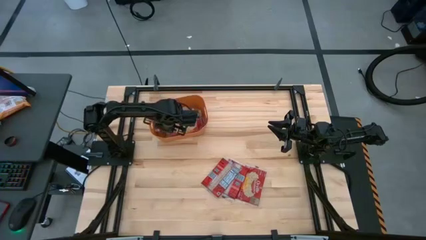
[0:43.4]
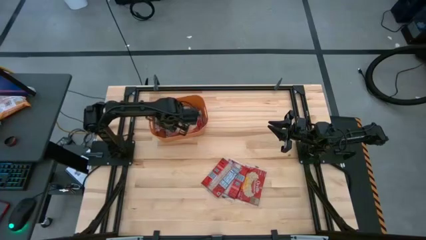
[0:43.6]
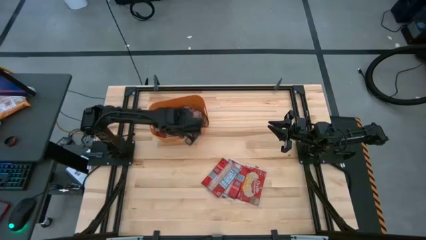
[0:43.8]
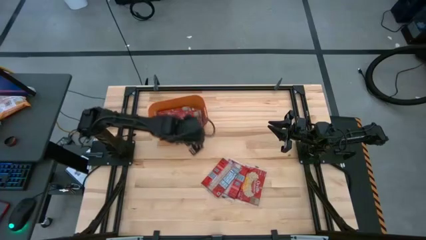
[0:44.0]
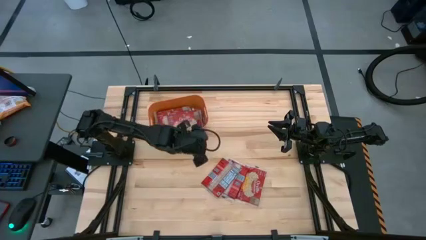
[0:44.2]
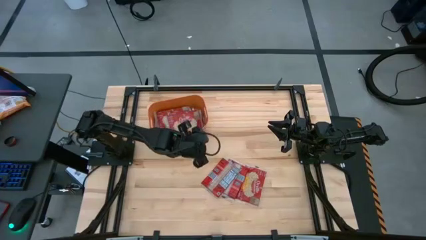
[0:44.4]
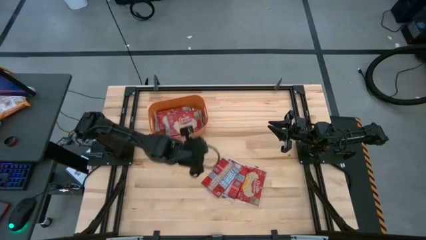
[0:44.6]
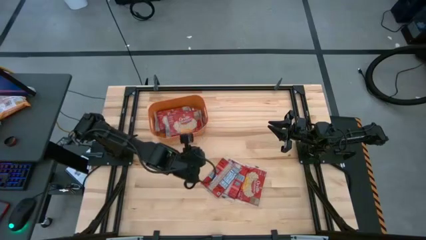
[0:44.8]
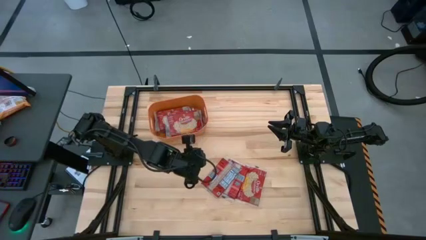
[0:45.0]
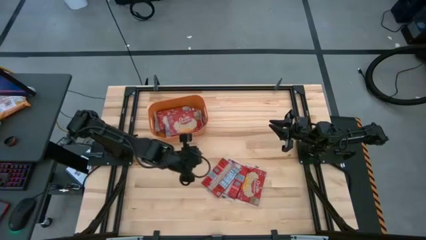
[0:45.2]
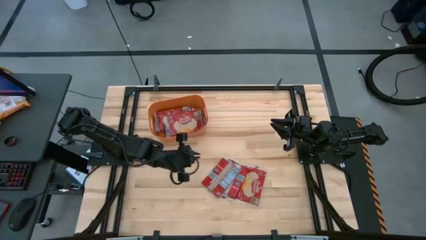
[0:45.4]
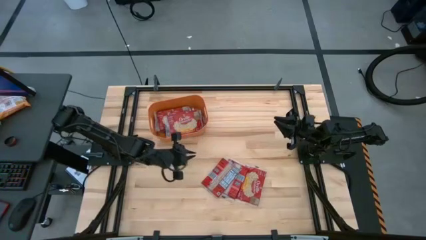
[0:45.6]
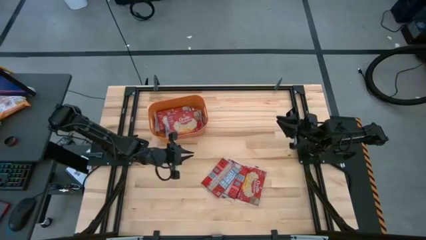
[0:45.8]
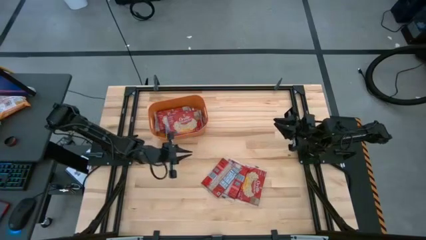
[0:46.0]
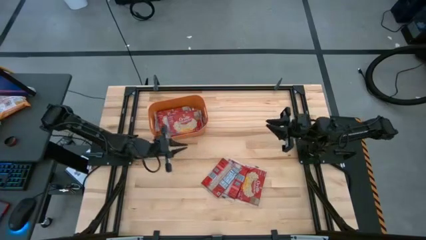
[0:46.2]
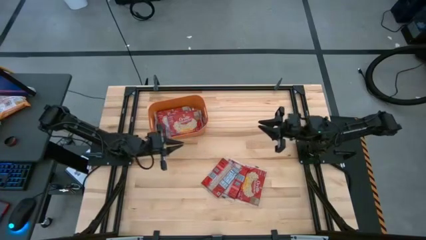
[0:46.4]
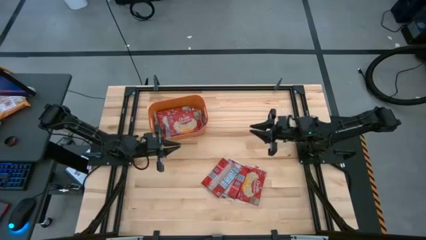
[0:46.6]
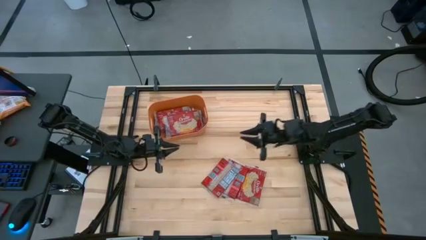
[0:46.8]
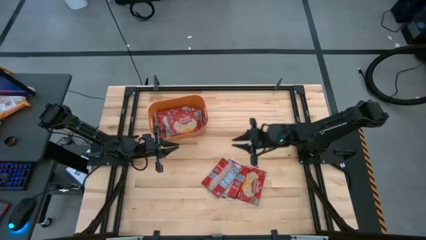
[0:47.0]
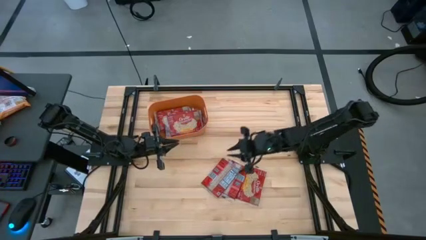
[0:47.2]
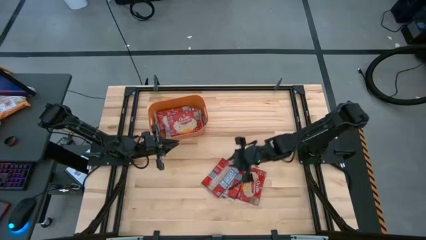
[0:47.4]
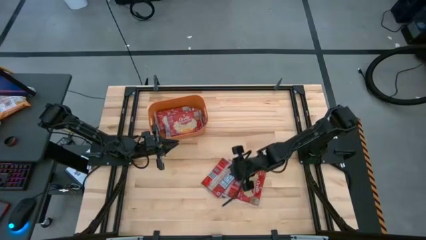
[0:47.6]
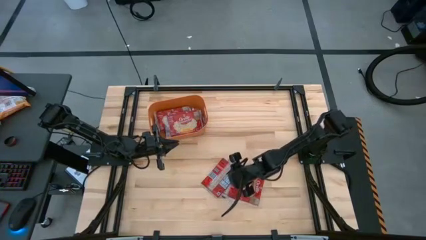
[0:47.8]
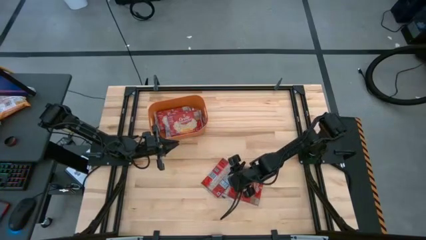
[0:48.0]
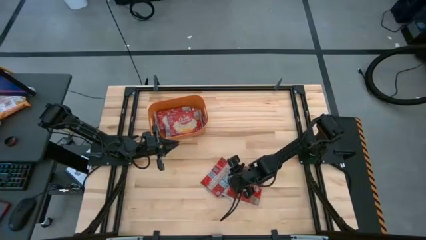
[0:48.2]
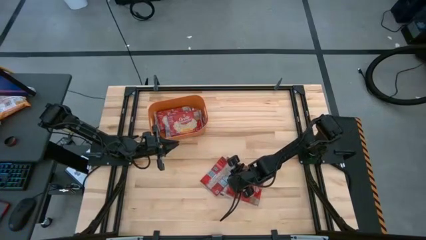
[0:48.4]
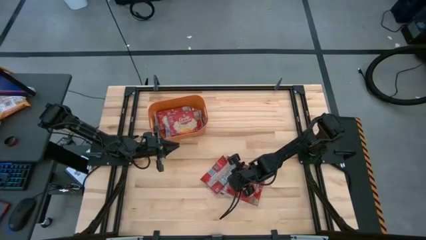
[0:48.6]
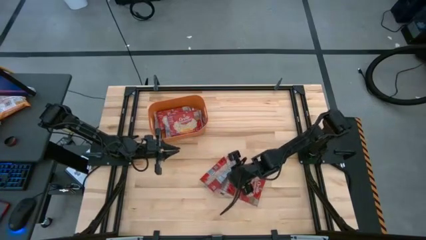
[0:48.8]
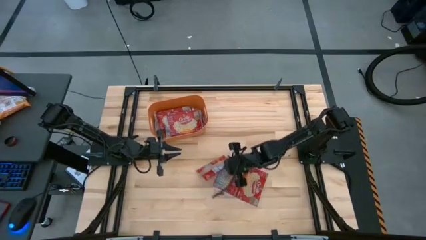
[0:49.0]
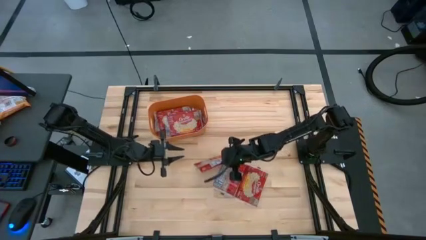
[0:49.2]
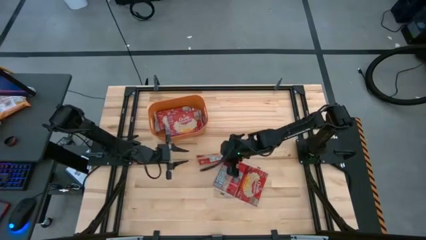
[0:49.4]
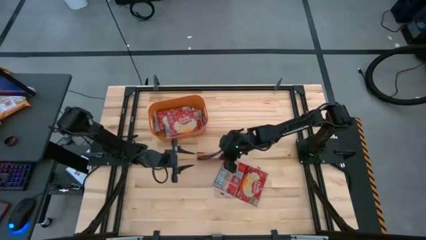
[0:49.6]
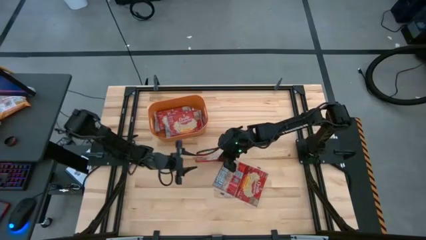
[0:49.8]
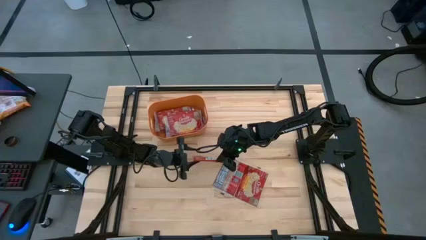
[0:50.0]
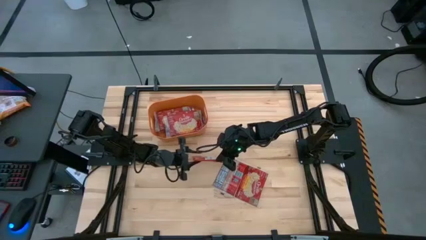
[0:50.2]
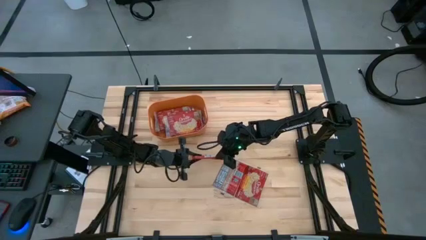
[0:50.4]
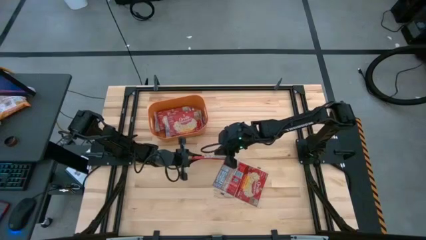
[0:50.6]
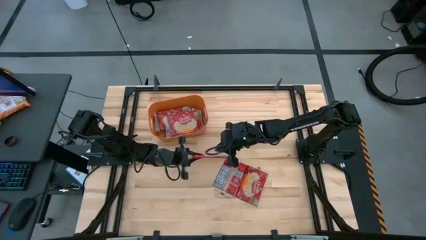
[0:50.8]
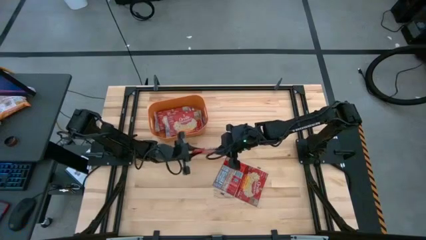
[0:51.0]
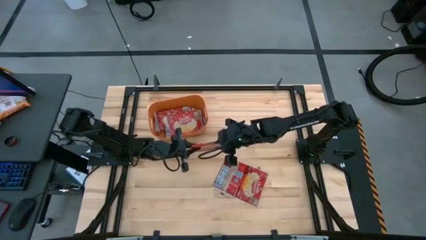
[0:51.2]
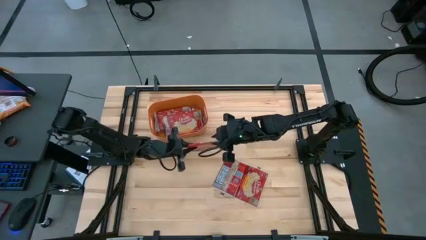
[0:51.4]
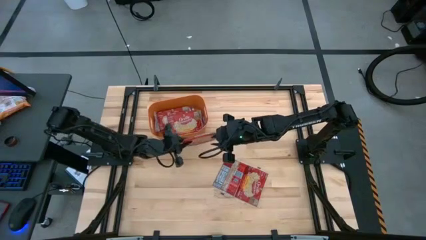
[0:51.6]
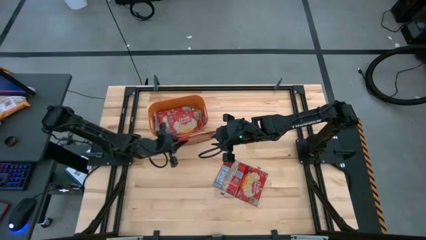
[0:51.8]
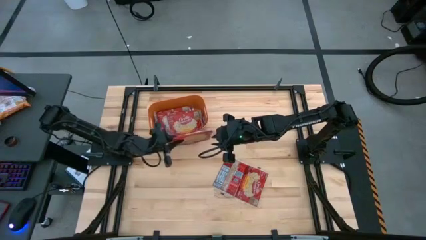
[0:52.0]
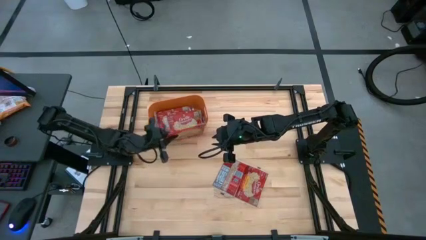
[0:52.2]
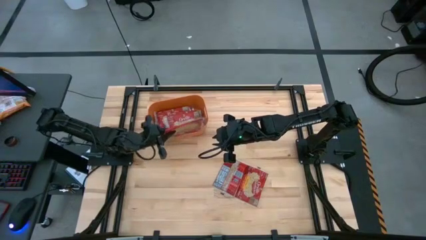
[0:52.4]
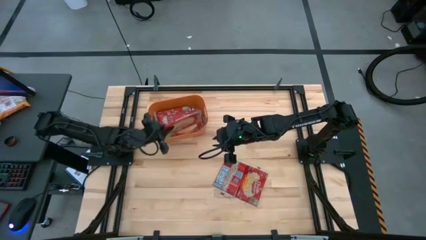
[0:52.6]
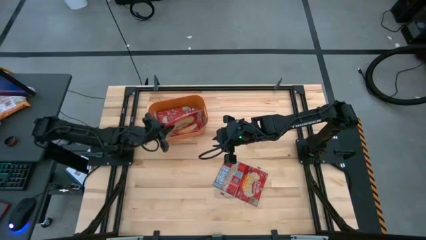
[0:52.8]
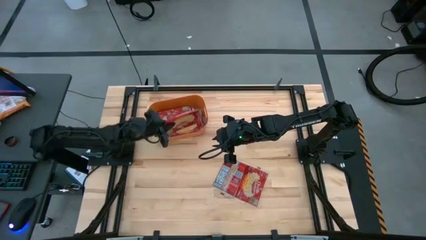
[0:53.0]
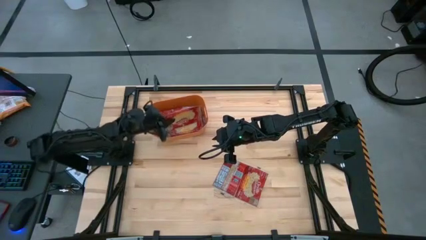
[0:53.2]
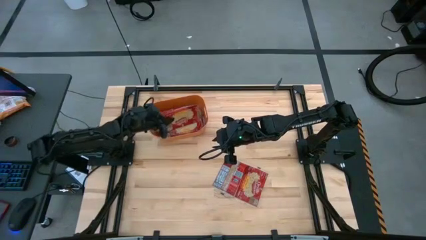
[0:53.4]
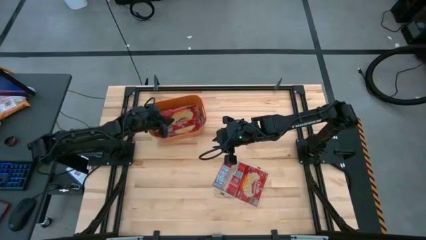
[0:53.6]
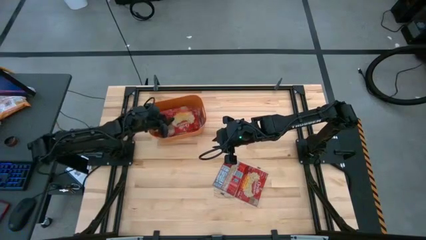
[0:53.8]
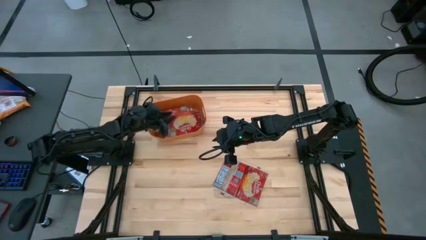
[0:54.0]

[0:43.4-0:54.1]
Task: Sort popcorn bags into baskets
Put the red popcorn bag into the orange container

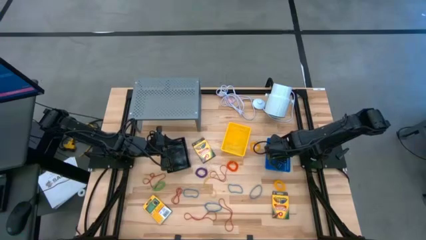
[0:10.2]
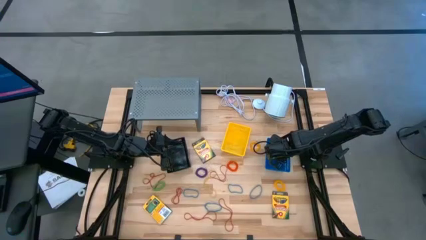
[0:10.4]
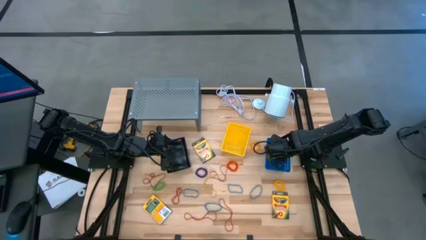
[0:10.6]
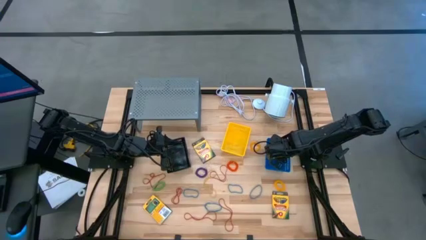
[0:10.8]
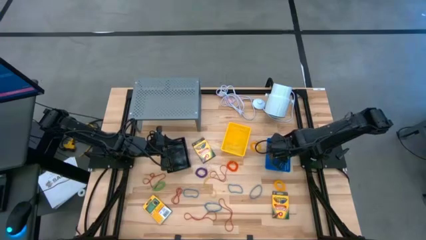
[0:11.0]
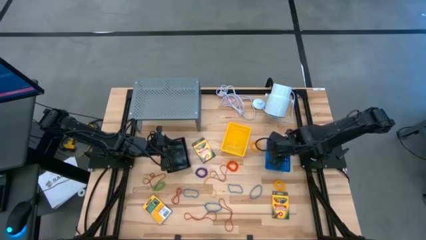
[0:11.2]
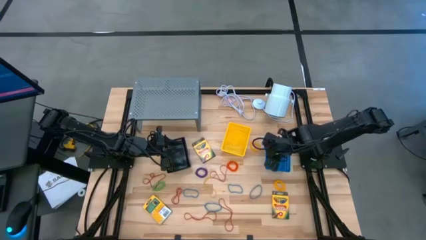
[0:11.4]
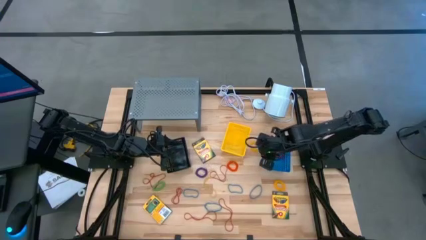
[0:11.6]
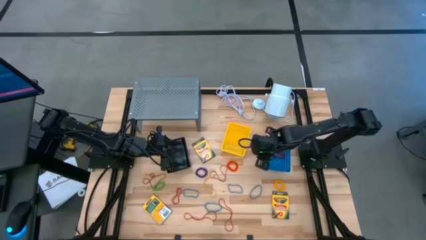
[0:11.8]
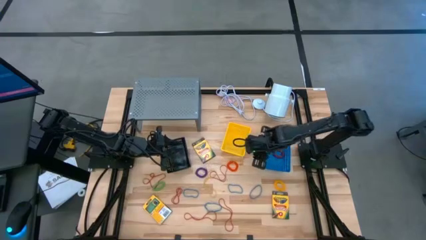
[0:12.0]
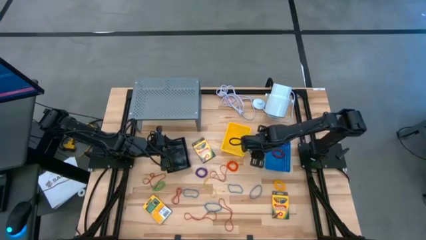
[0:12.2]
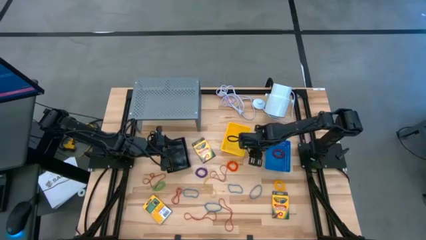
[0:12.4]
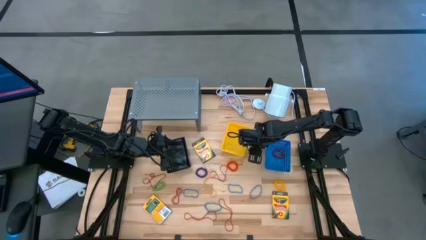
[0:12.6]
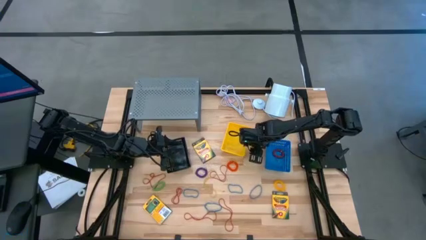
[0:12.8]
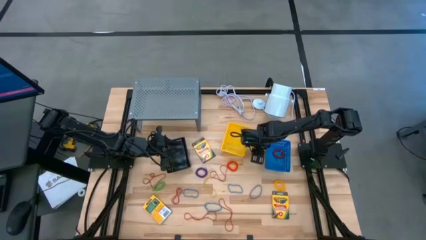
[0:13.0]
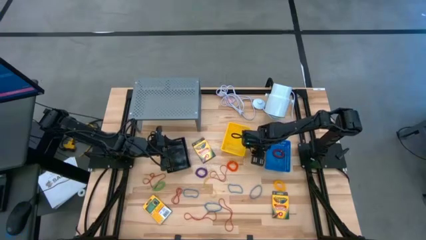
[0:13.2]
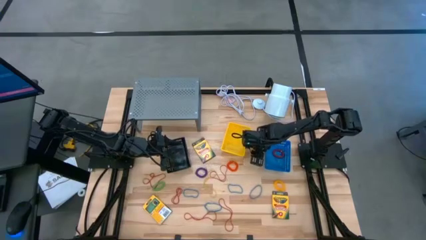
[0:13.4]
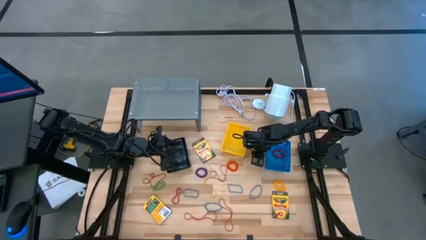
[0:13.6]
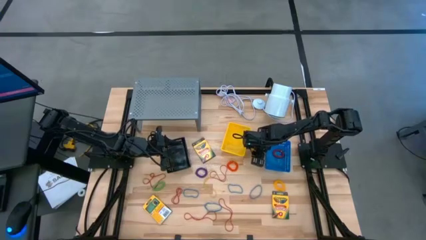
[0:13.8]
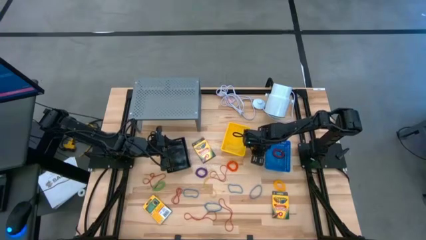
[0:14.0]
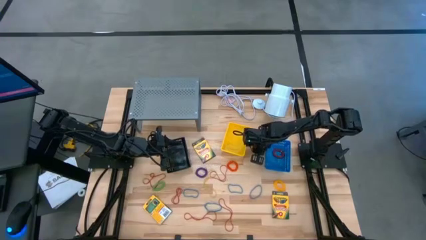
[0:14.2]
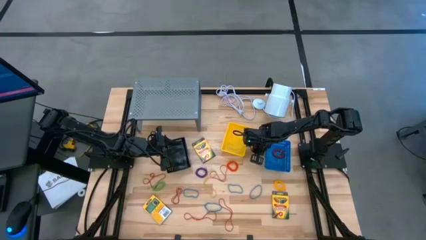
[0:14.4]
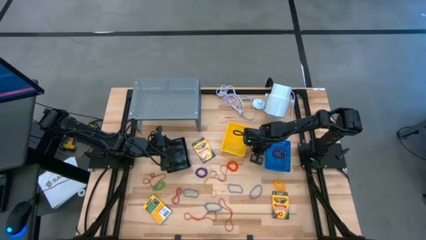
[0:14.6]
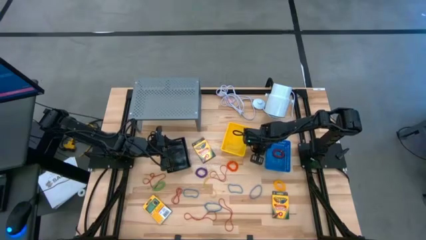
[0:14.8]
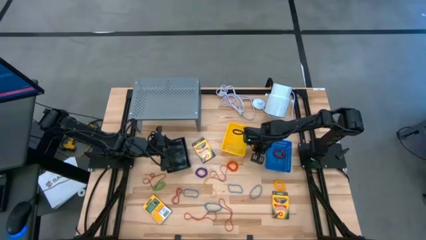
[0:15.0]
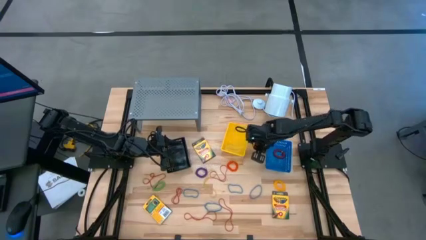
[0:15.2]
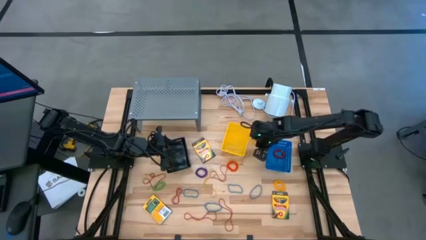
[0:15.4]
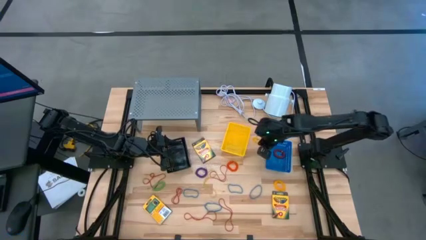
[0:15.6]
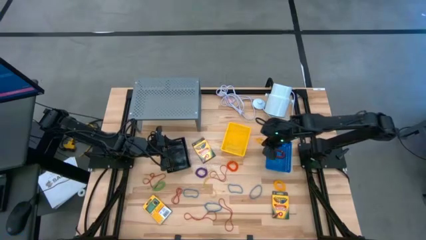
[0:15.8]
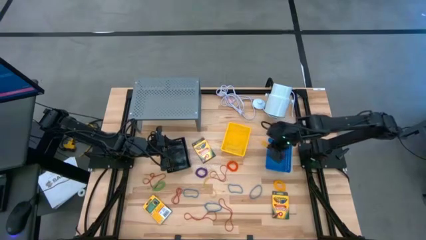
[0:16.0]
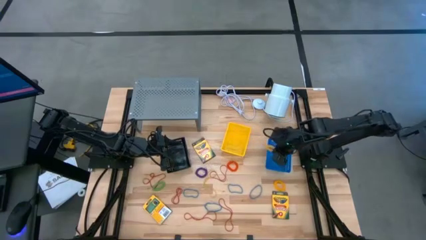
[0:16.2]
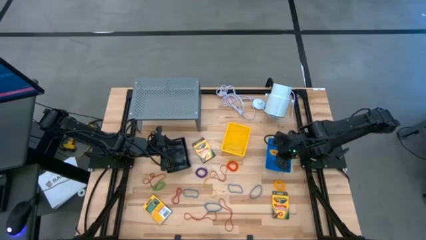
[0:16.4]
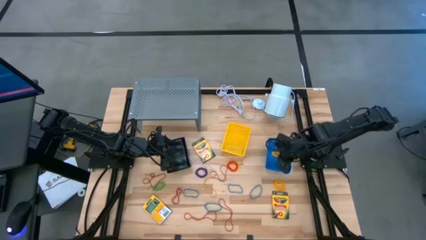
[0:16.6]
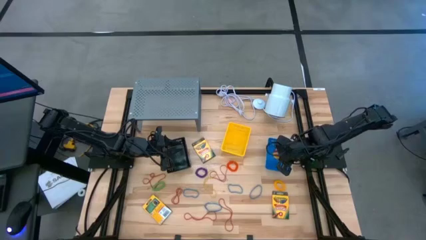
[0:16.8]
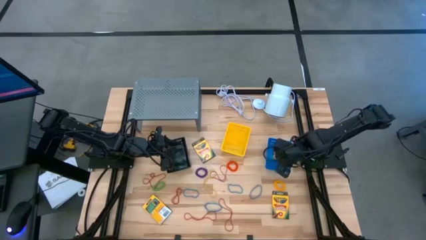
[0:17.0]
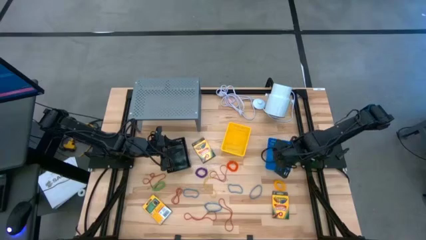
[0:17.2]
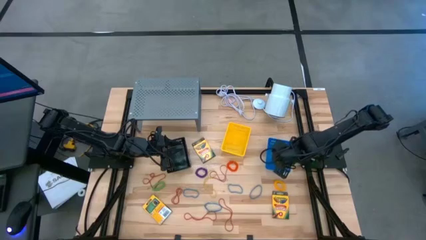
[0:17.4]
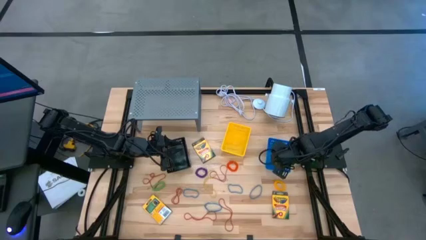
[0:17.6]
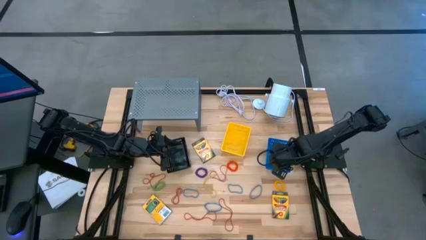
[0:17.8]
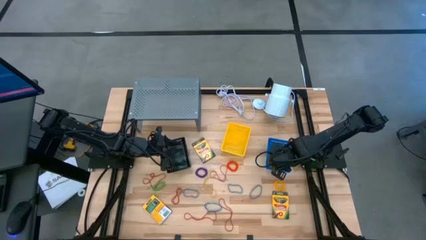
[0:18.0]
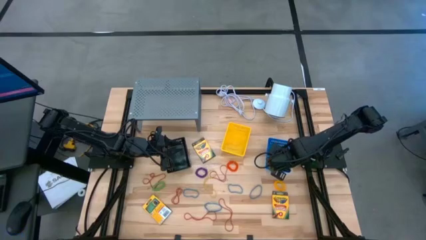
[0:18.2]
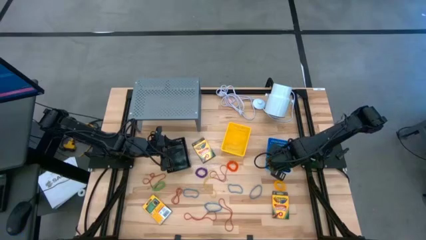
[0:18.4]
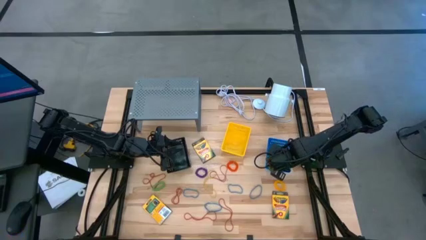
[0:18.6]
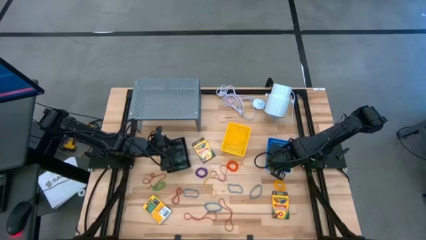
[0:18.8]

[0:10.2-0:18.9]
Task: Pick & Place Office Desk Supplies
Put the yellow spring keychain into the blue bin
